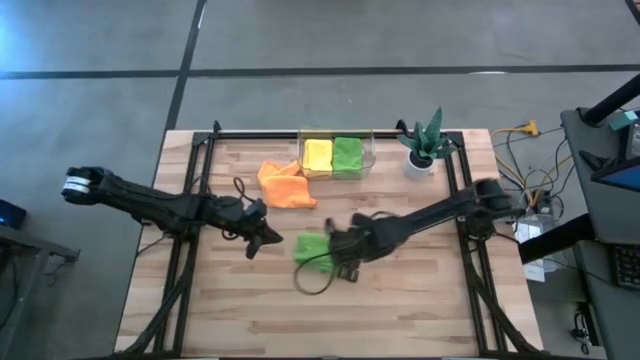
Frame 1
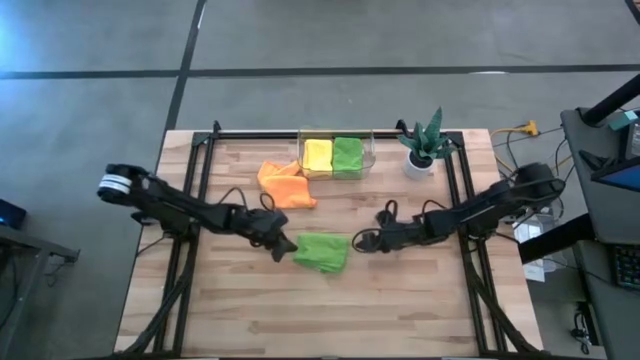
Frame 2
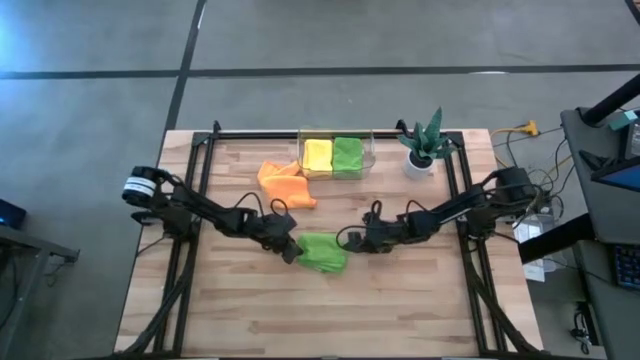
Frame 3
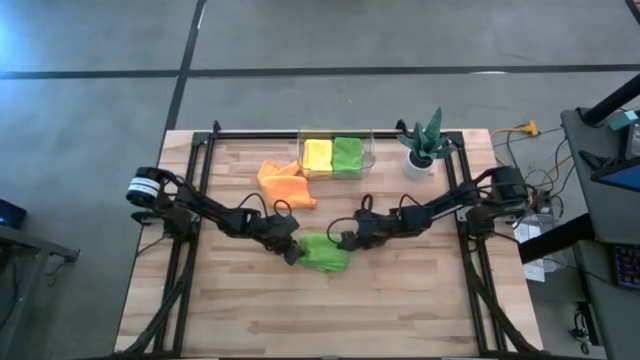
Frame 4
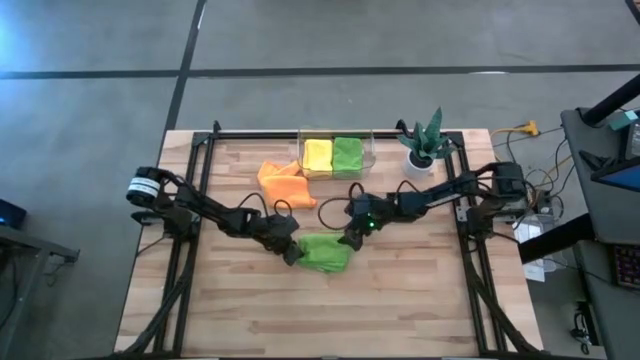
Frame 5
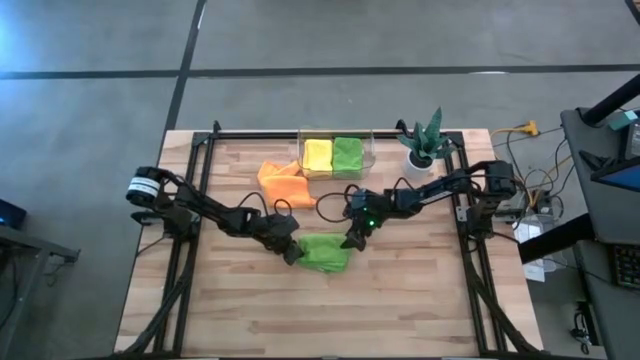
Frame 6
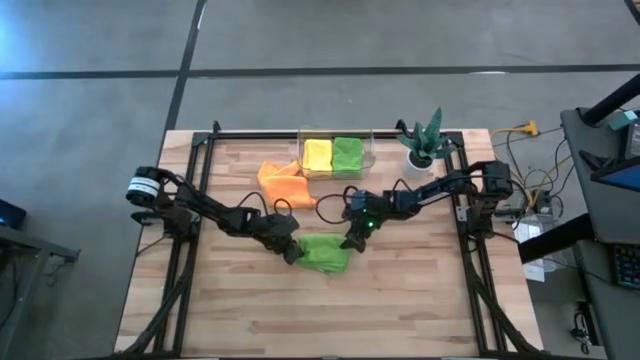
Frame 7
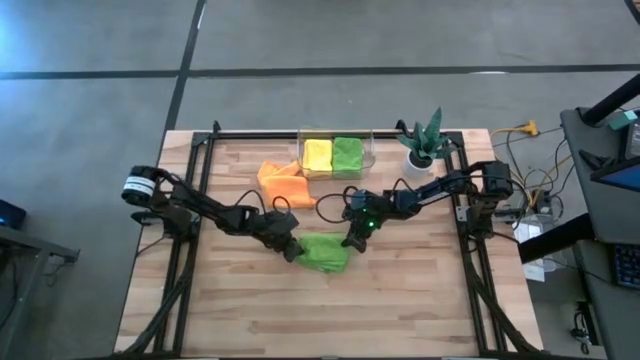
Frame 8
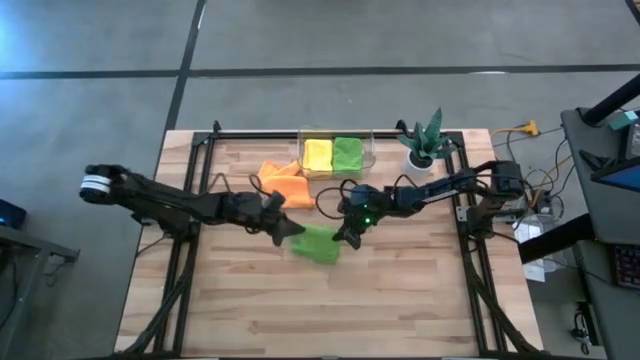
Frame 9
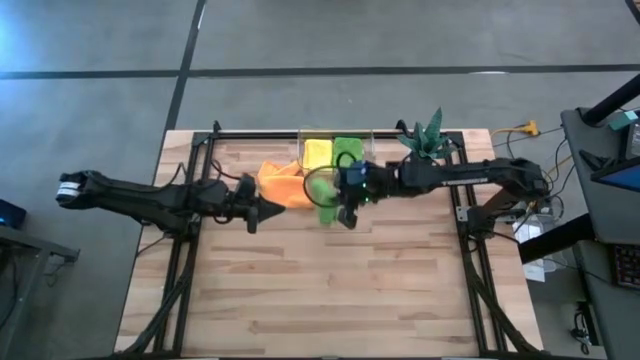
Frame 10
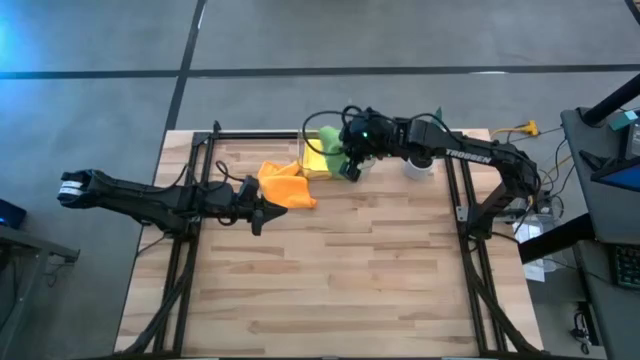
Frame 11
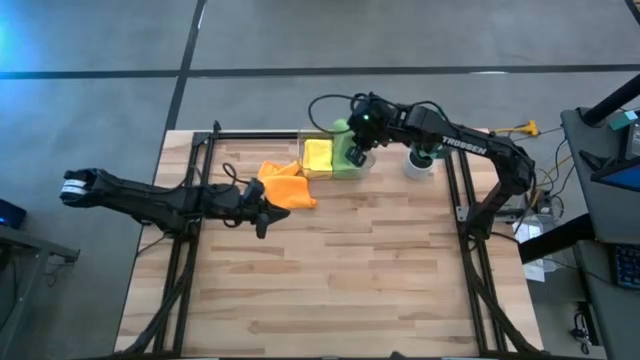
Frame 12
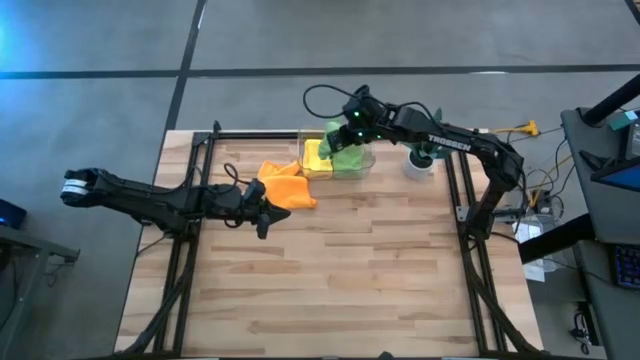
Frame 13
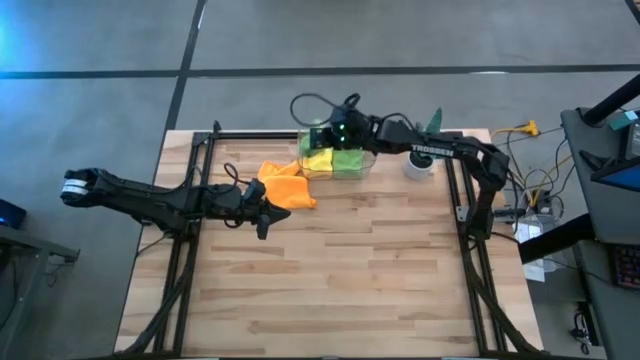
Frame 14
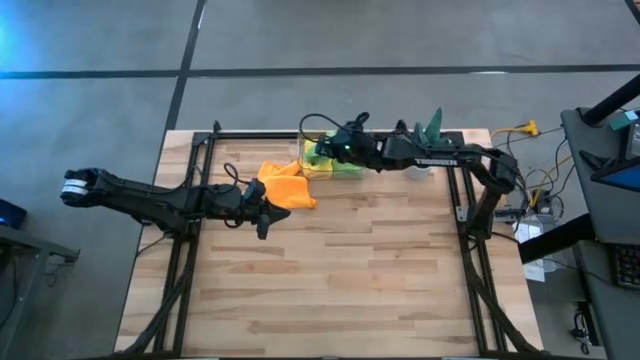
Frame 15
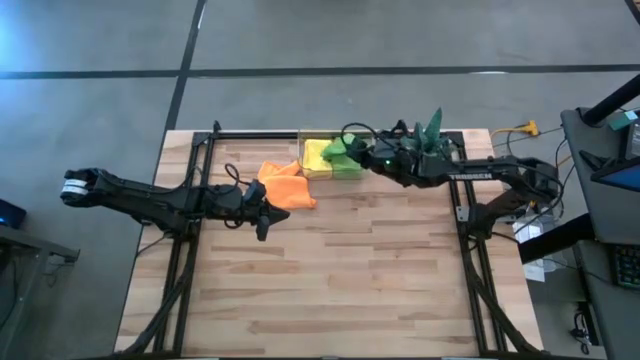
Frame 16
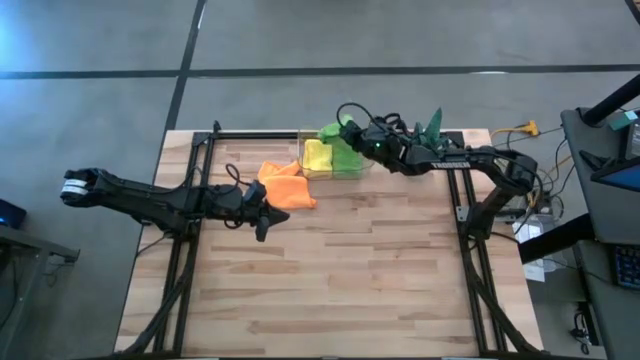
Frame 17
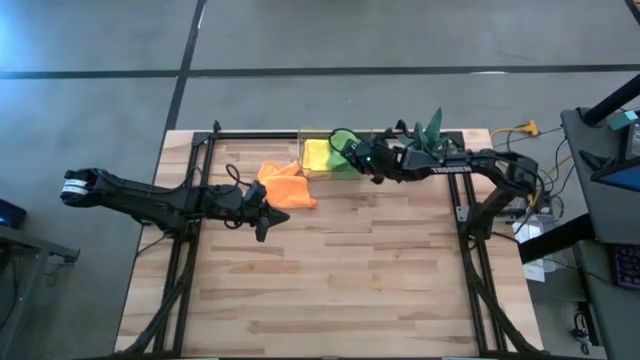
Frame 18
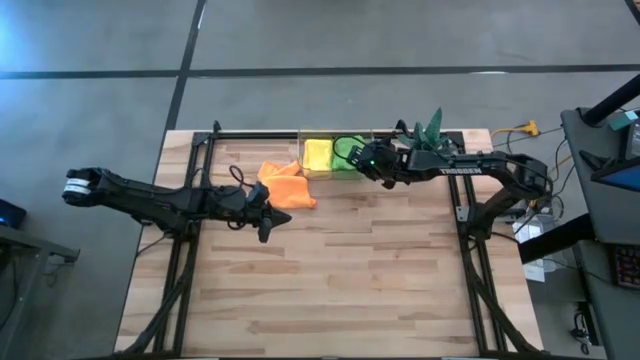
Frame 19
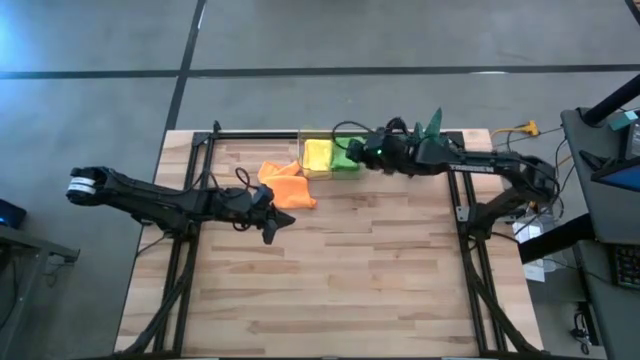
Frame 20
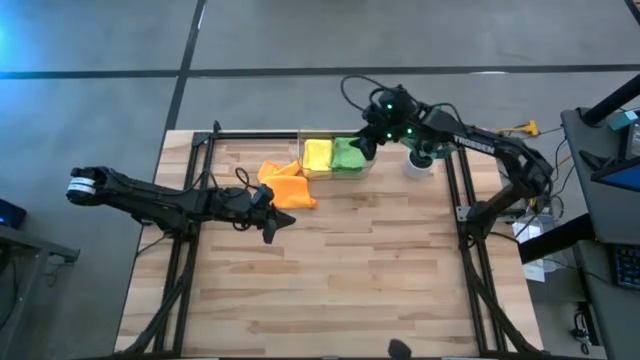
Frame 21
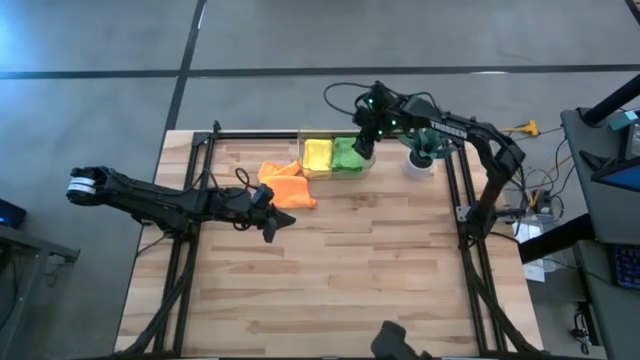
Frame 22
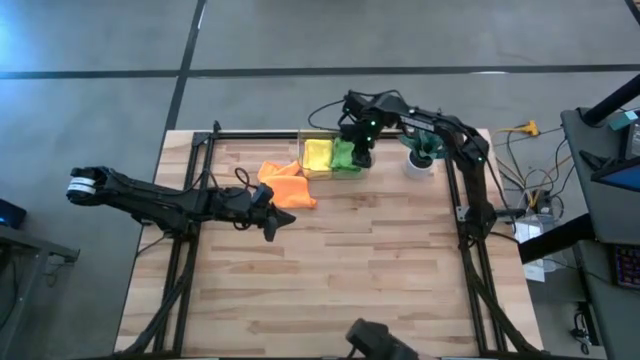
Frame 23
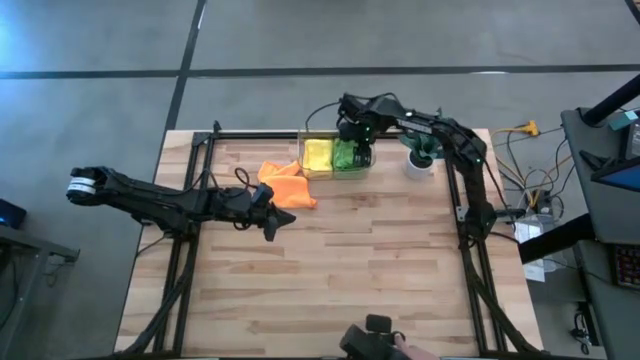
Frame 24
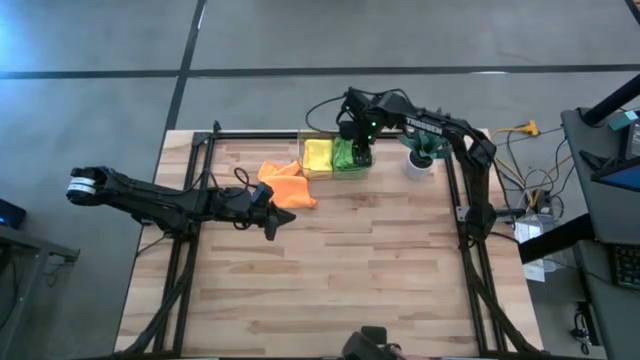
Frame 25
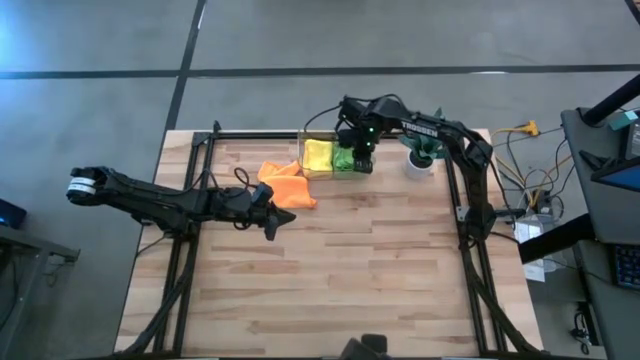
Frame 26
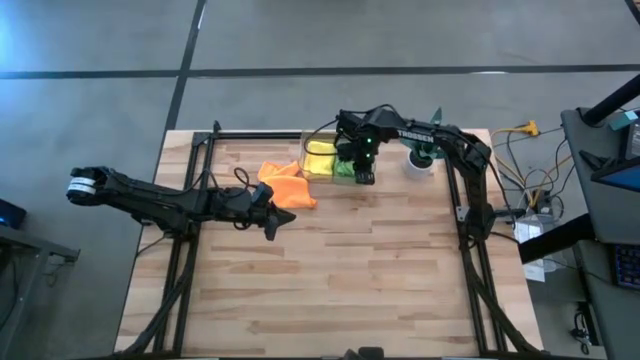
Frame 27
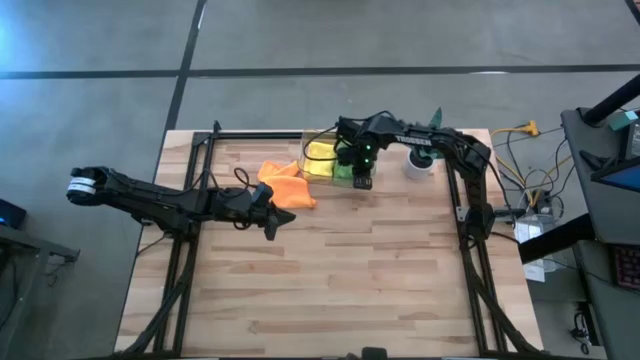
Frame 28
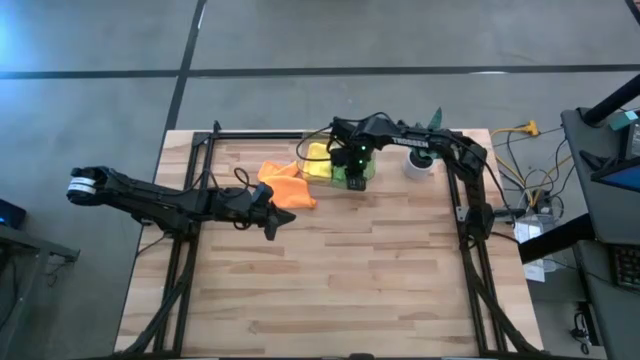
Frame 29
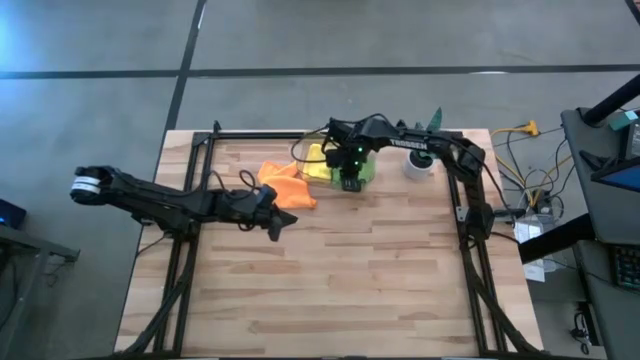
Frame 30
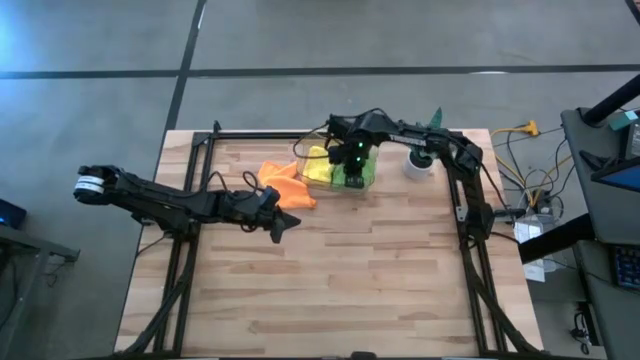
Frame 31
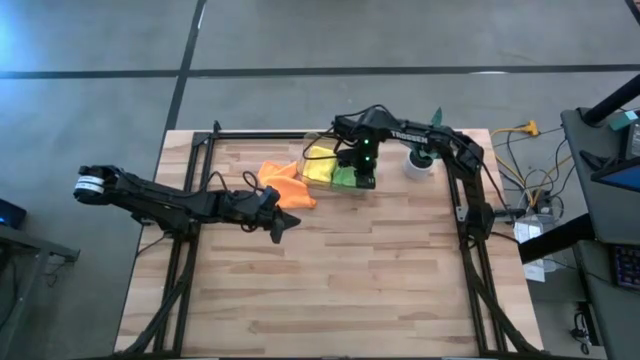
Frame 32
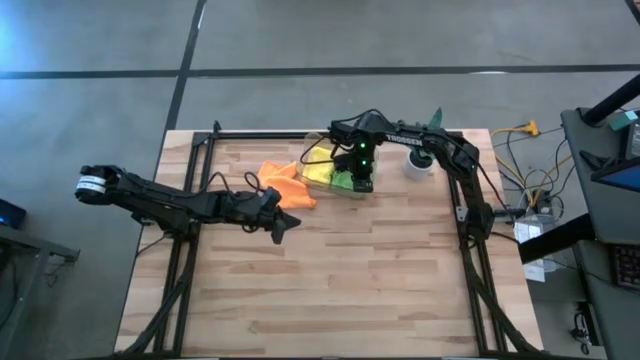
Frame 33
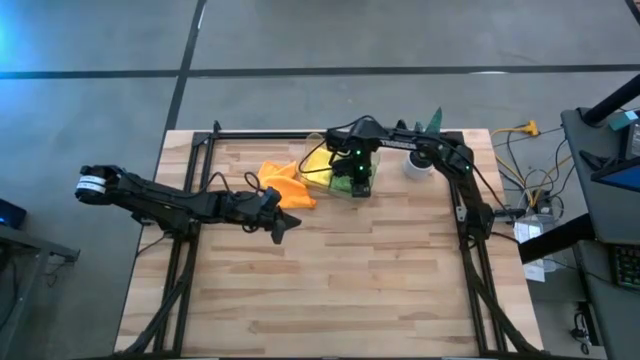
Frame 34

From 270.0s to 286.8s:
Task: Fold microfiber towels
Put the folded green microfiber towel into the transparent bin

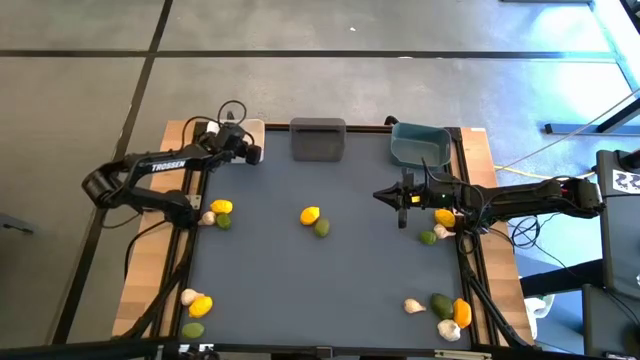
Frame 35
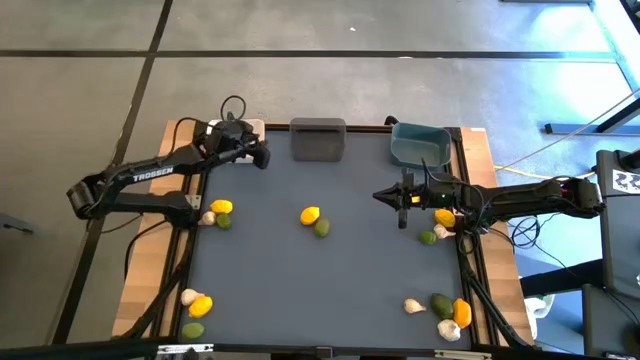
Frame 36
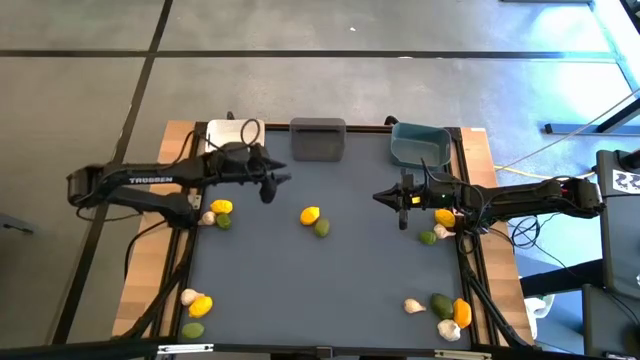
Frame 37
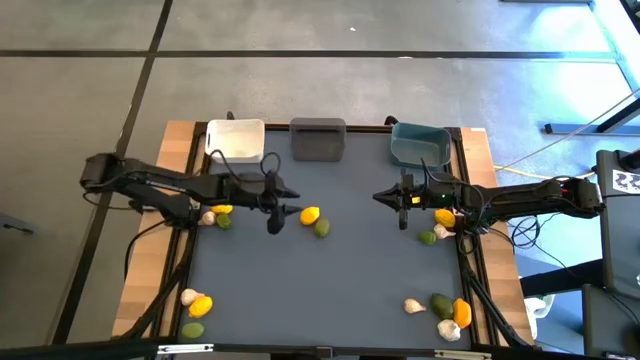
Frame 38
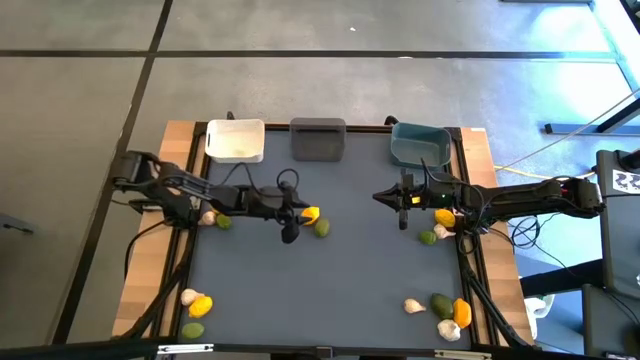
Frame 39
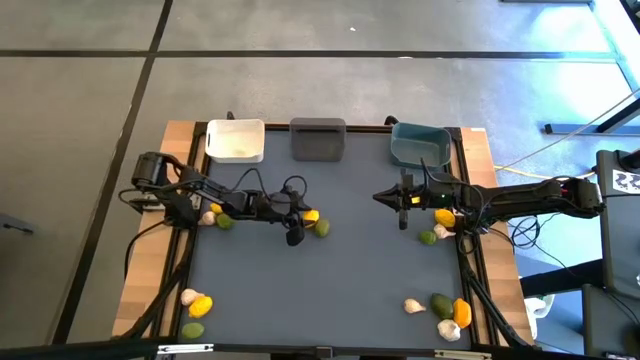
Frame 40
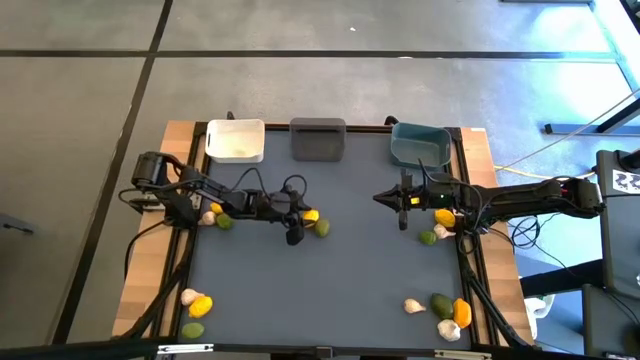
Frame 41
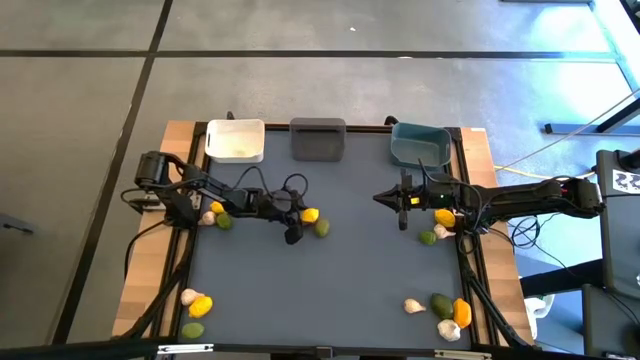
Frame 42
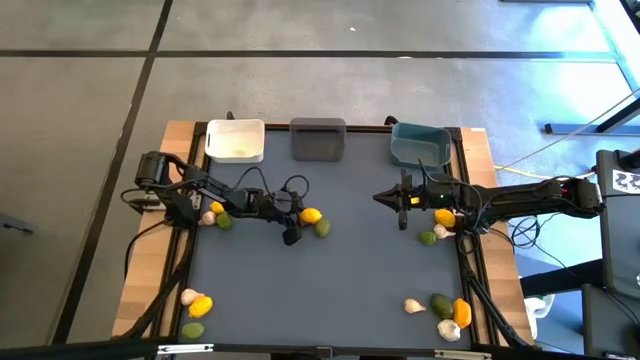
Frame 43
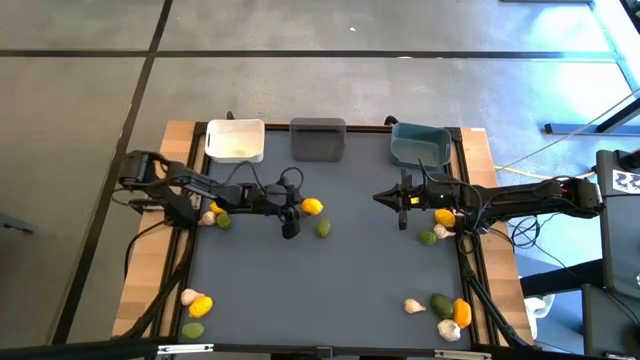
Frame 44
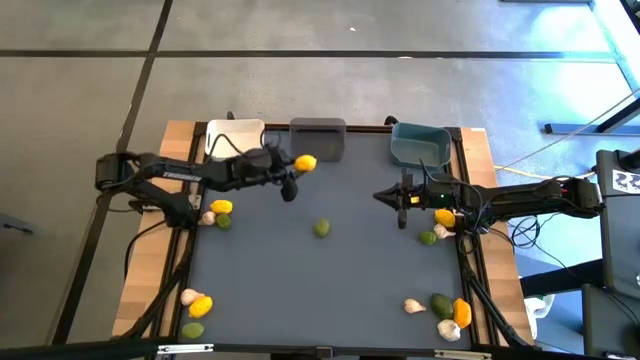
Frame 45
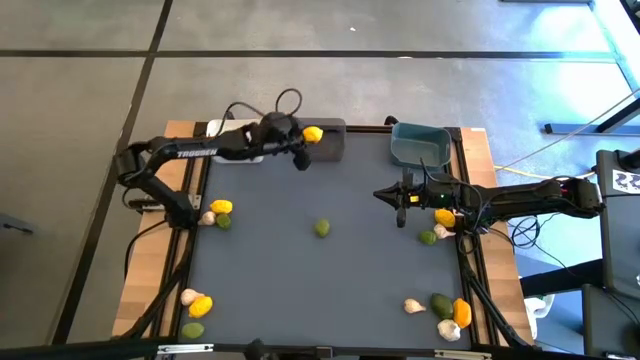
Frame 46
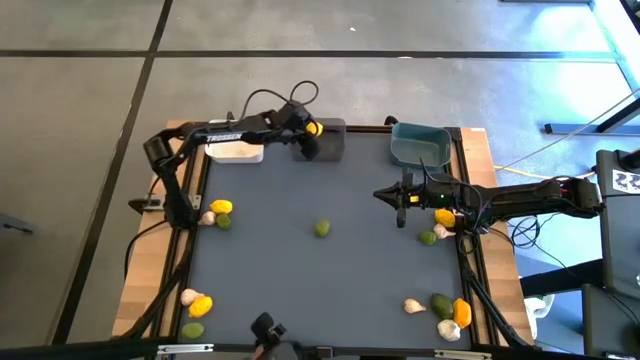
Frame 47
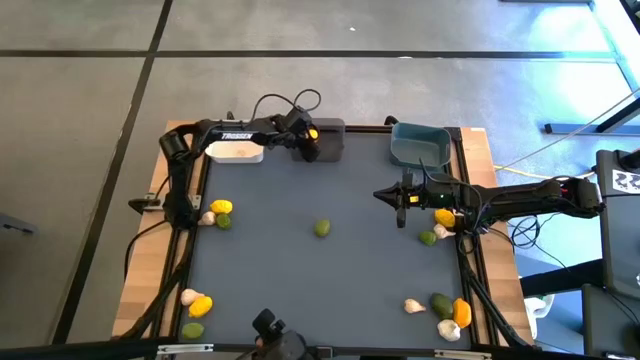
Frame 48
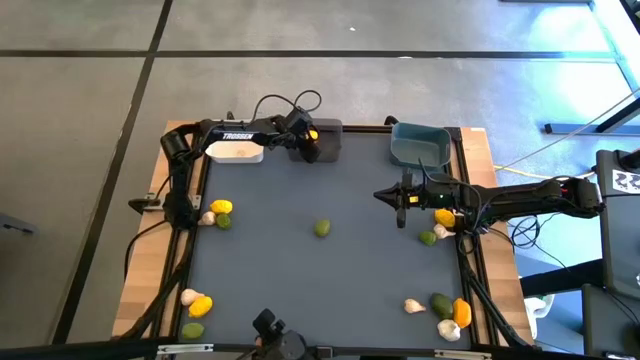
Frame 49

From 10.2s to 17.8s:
Task: Sort produce into baskets
Put the lemon into the black transparent bin
